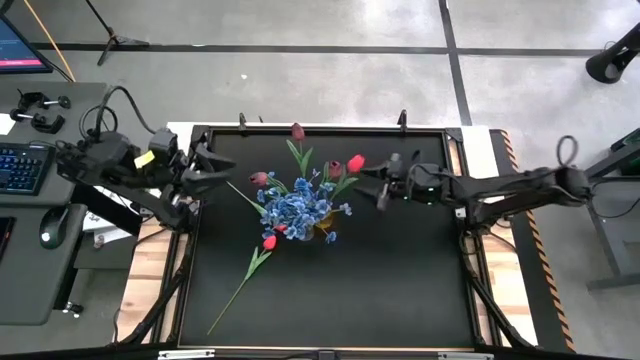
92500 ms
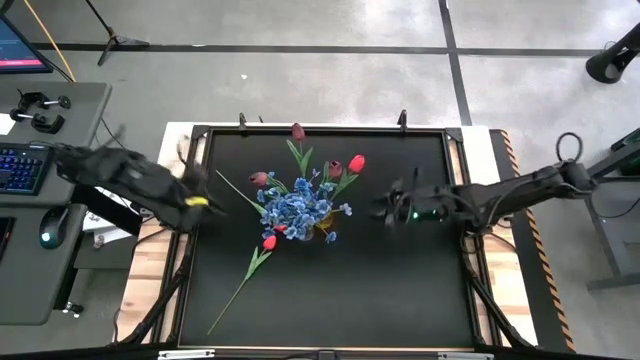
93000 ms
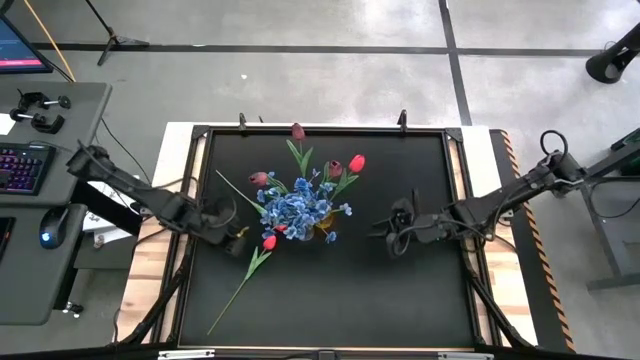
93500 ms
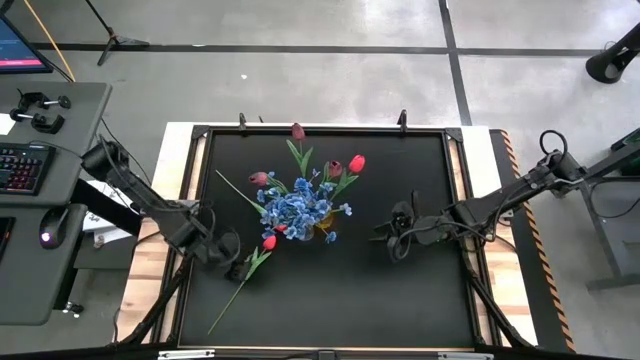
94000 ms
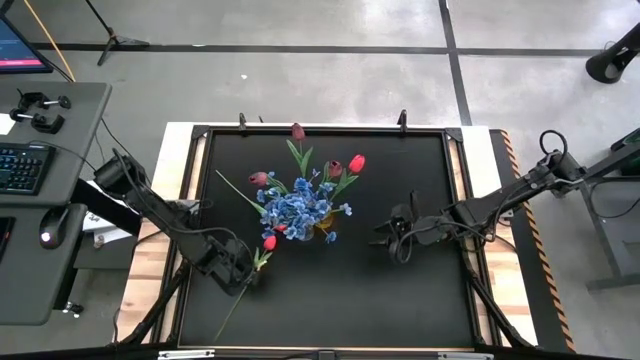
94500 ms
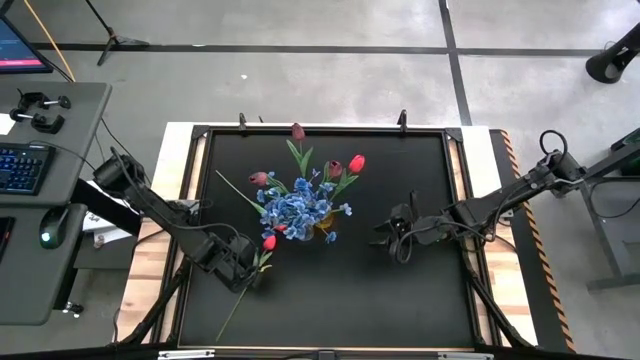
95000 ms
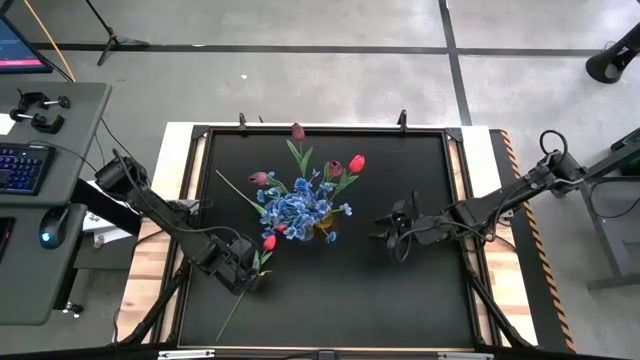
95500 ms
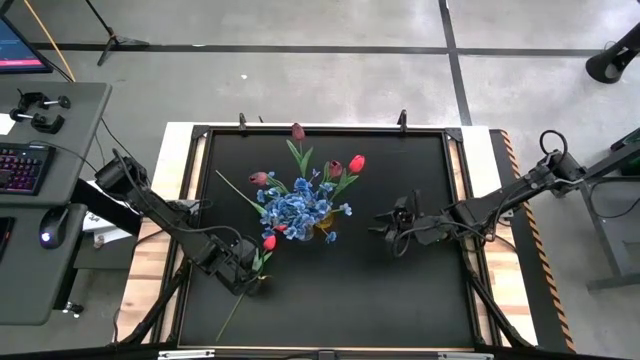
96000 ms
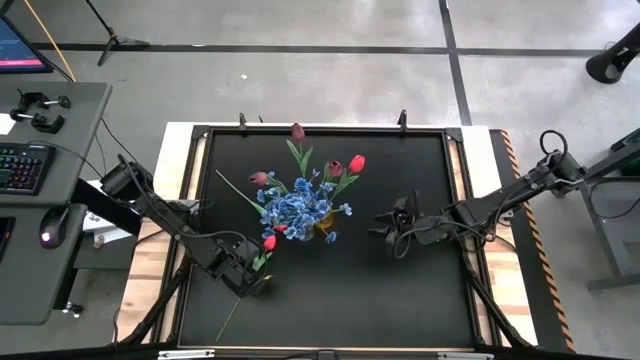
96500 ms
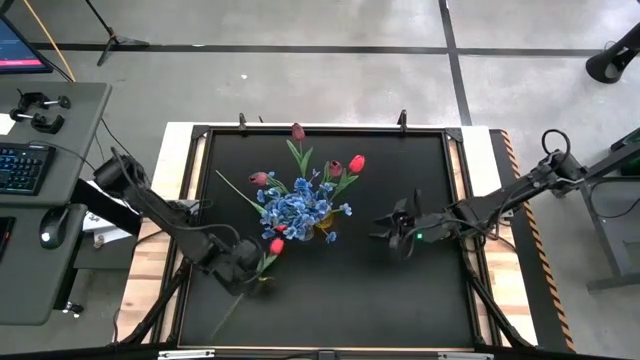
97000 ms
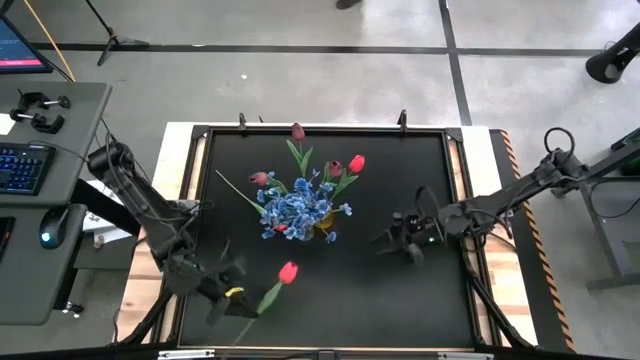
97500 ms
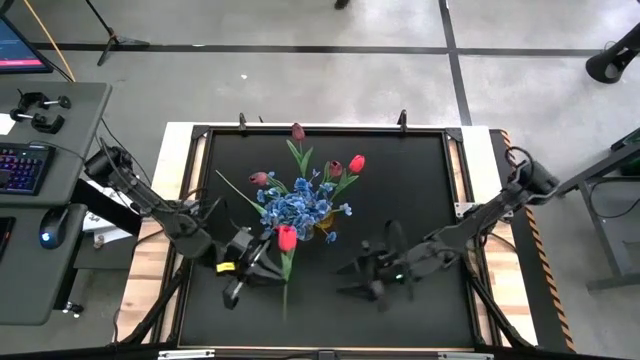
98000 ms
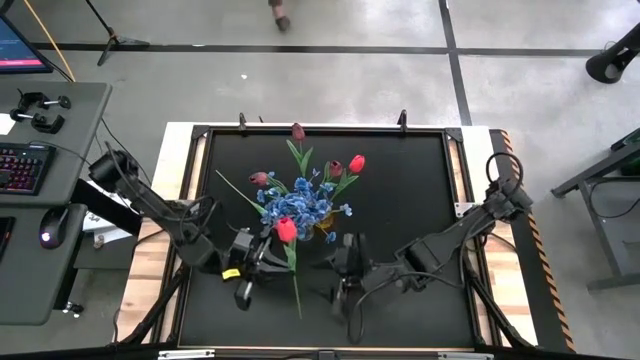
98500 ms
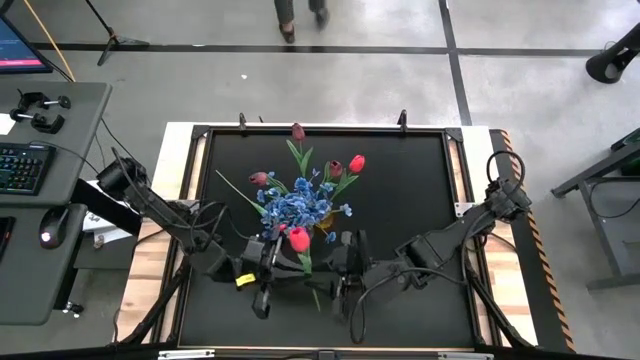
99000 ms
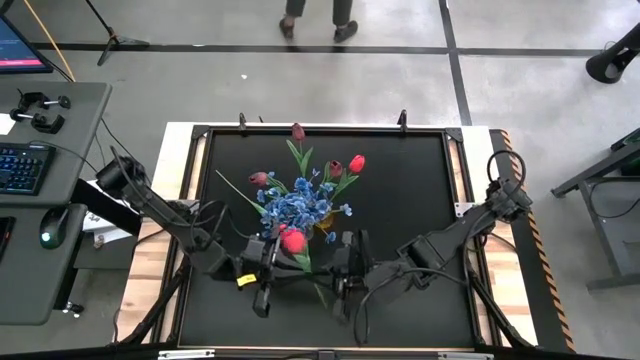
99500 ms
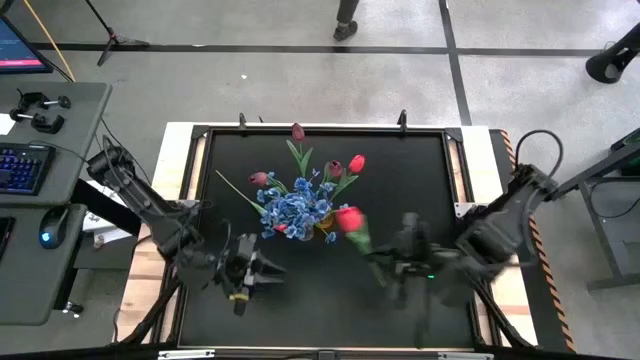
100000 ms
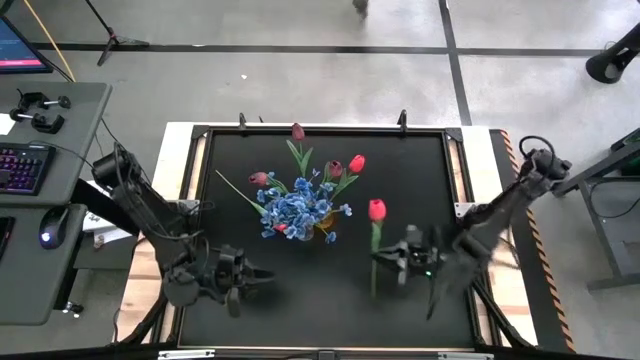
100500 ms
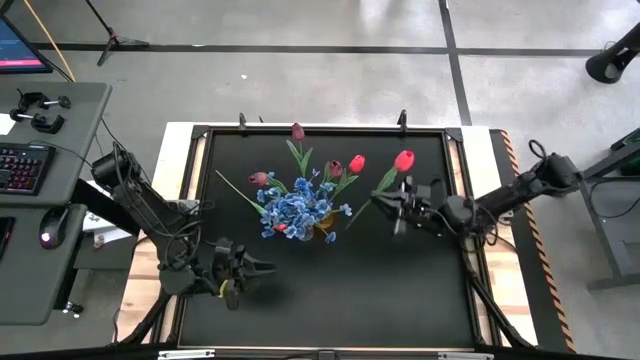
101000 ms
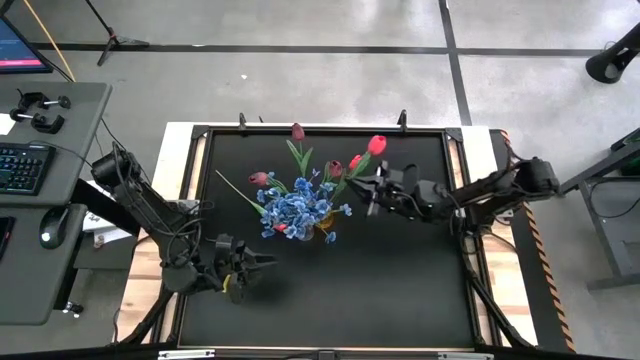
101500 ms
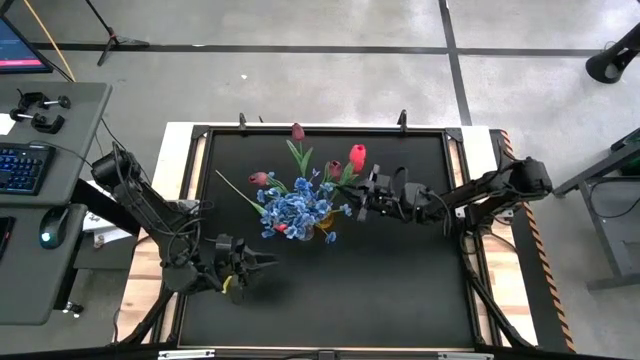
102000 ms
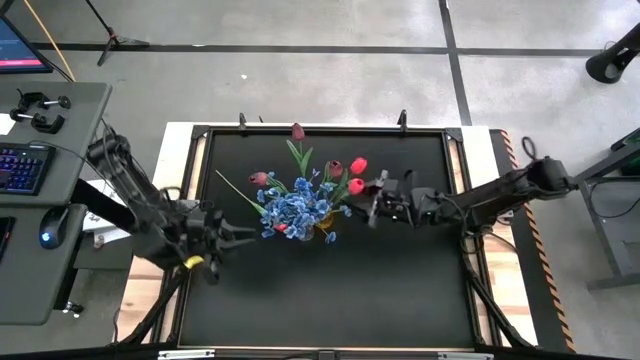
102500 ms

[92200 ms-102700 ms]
Task: Sort flowers into vase by color
Put the bottom red flower into the yellow vase
